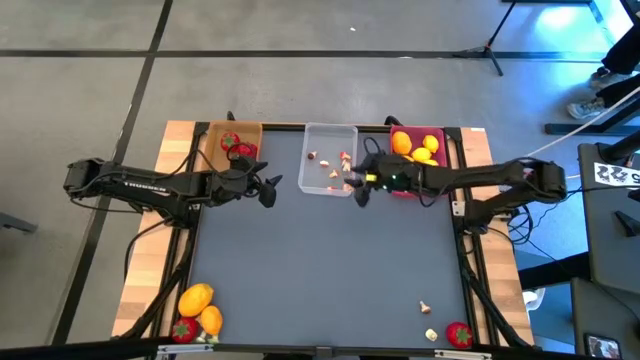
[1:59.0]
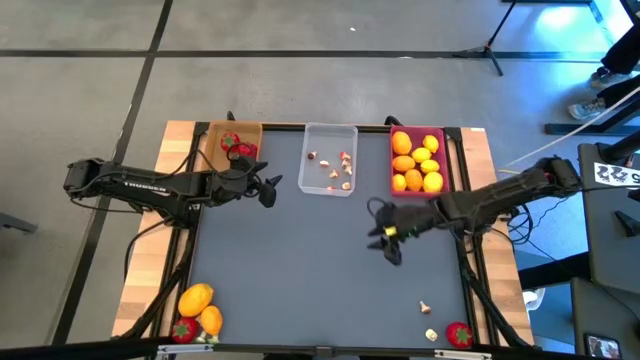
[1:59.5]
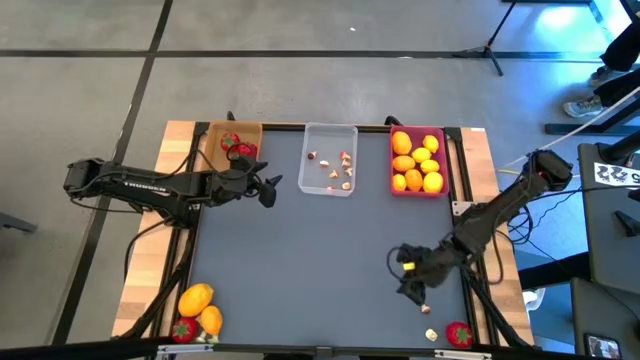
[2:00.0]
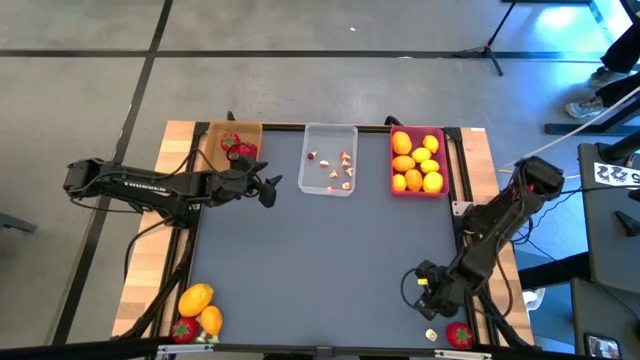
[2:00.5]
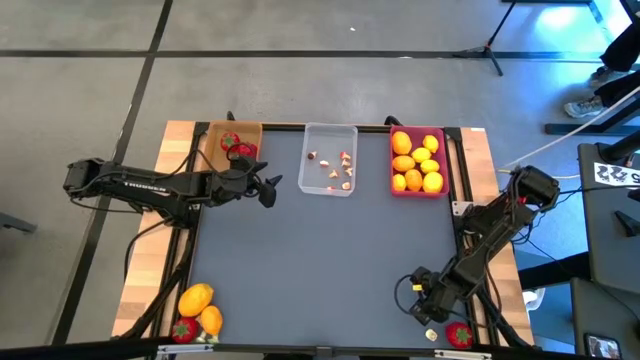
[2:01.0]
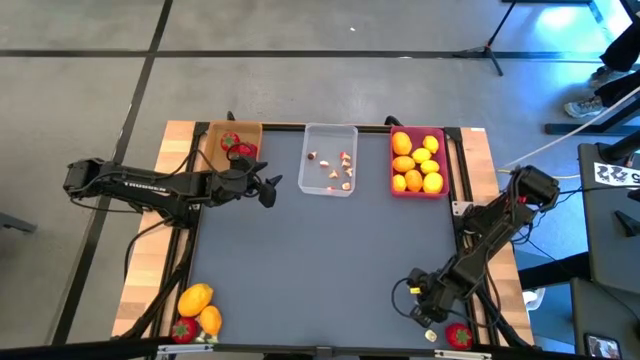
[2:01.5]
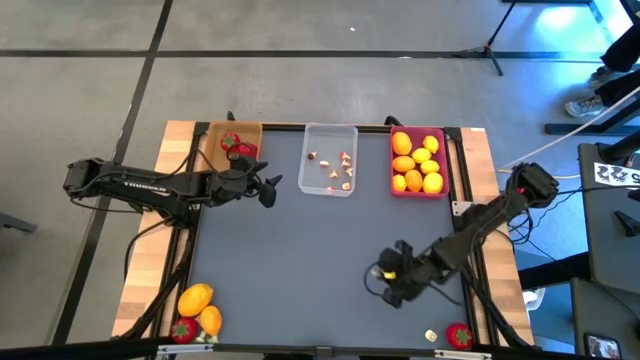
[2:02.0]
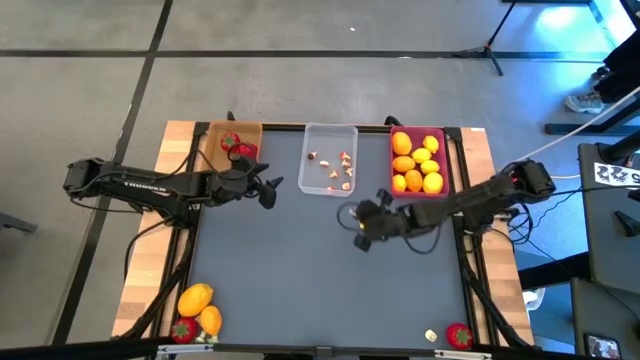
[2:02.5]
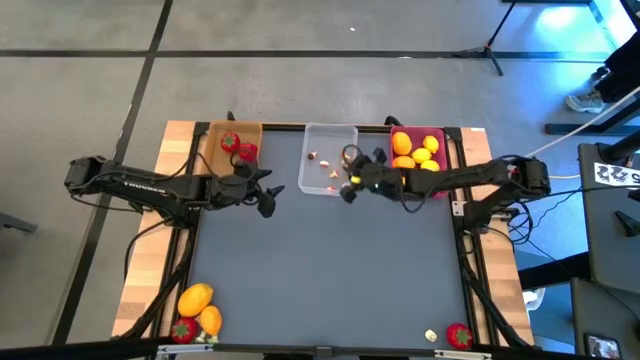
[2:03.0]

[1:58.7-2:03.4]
Task: Sort produce into baskets
Put the mushroom into the transparent bin

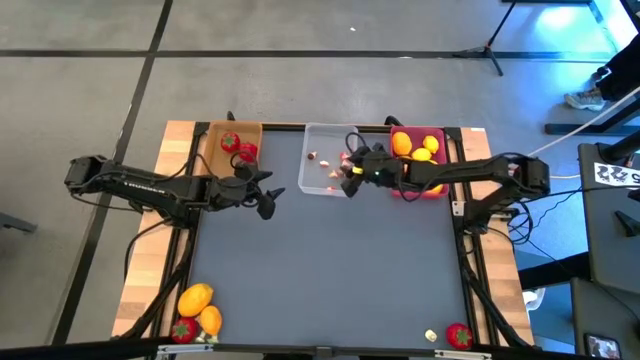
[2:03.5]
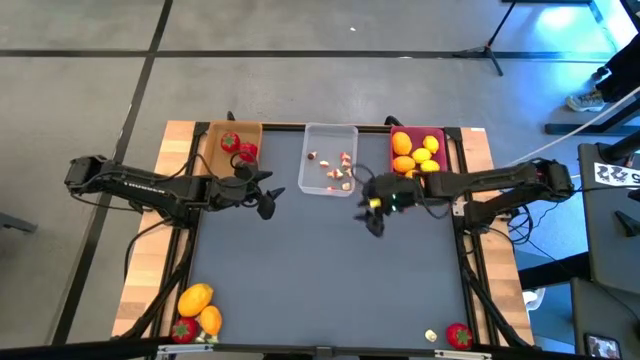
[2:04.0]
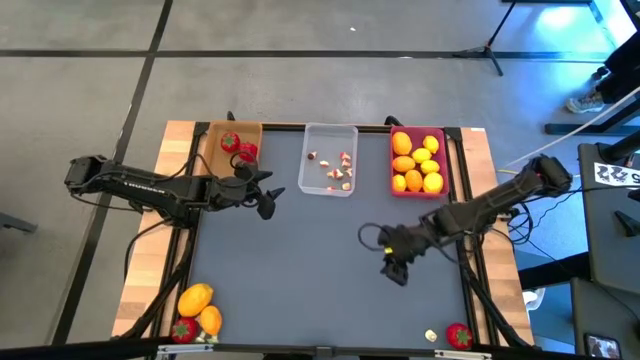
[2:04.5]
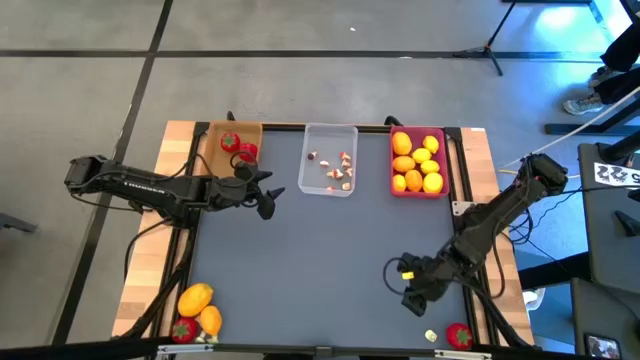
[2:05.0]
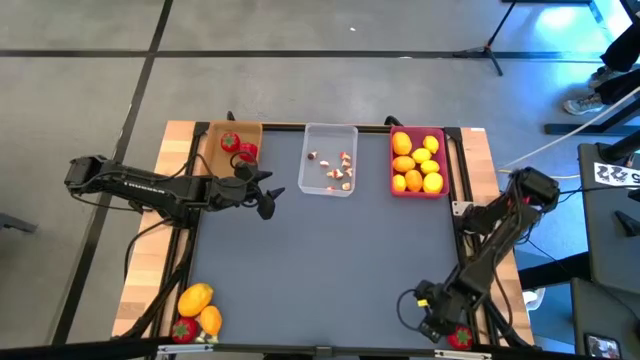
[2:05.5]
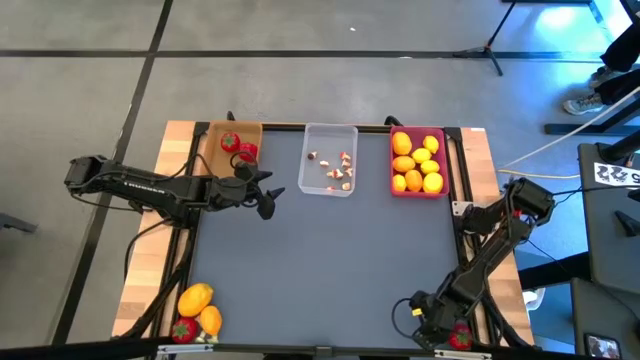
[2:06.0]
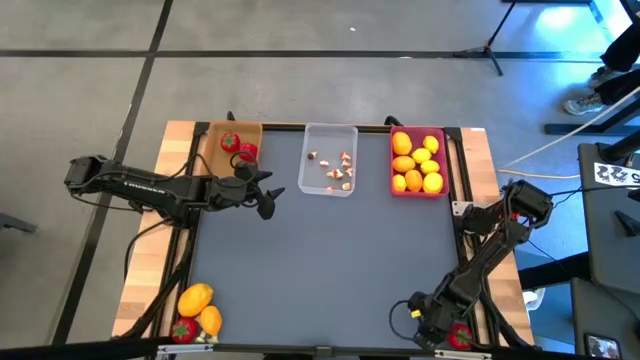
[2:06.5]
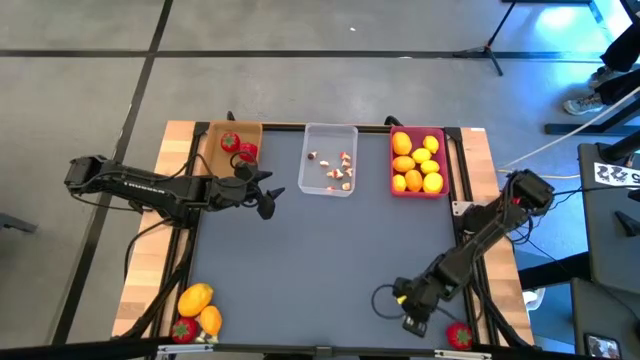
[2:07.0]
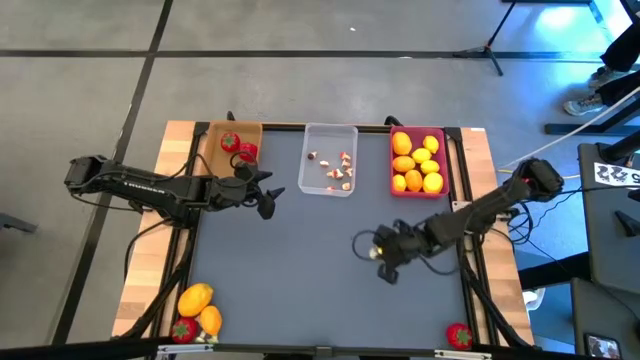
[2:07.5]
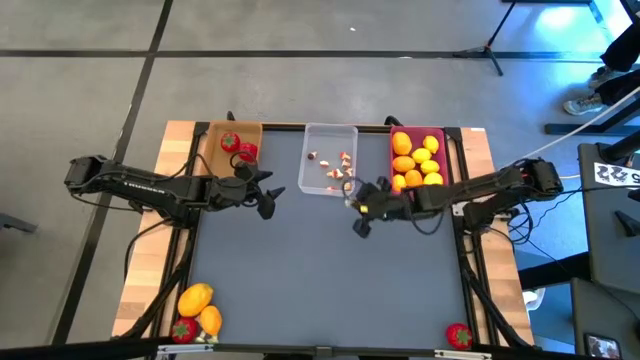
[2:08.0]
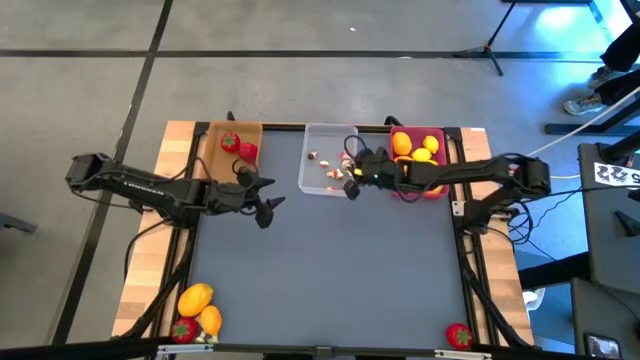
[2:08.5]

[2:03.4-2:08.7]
Put the mushroom into the transparent bin

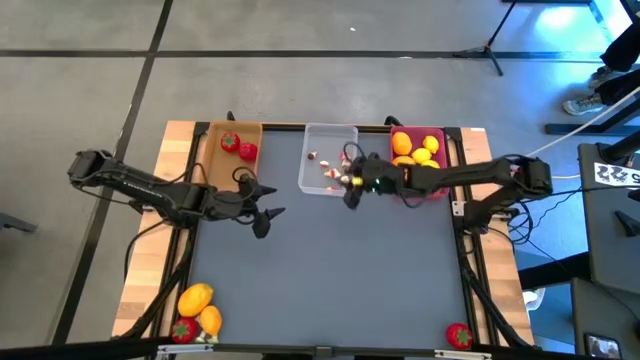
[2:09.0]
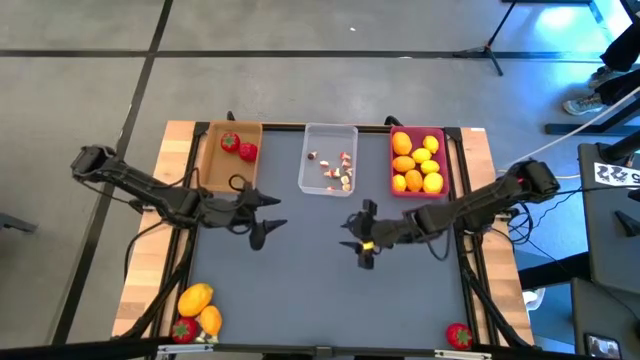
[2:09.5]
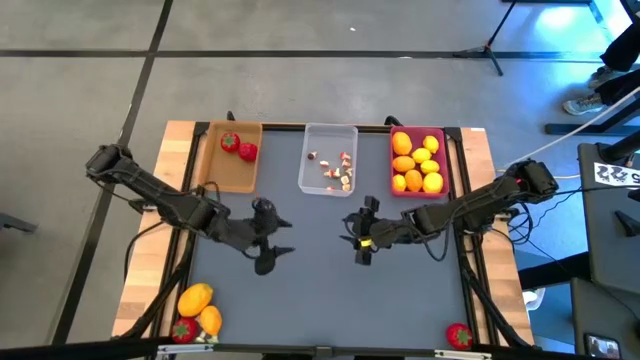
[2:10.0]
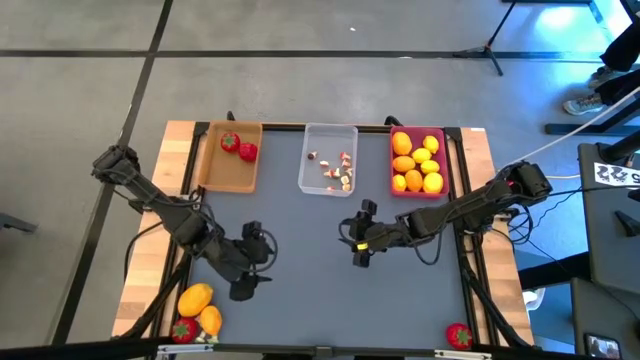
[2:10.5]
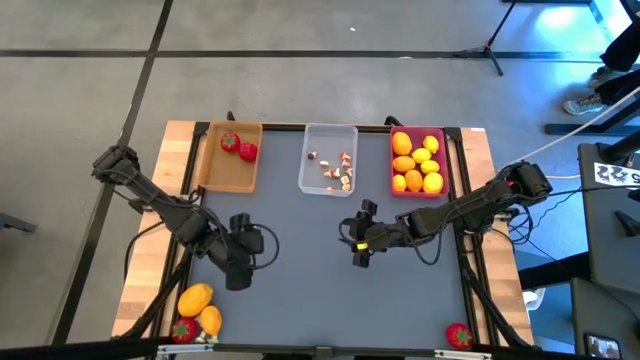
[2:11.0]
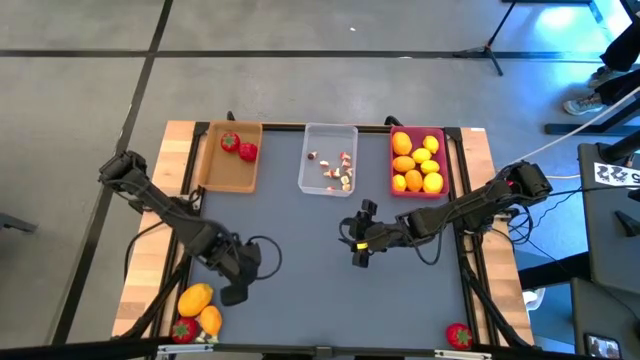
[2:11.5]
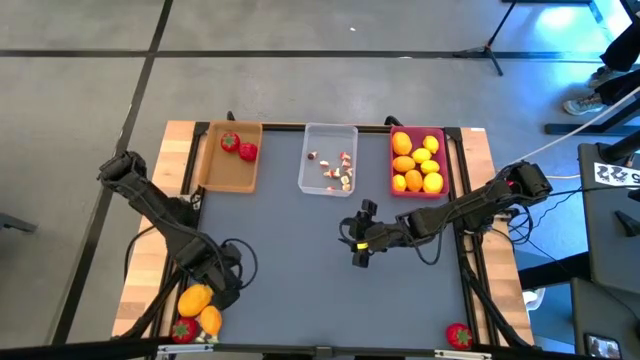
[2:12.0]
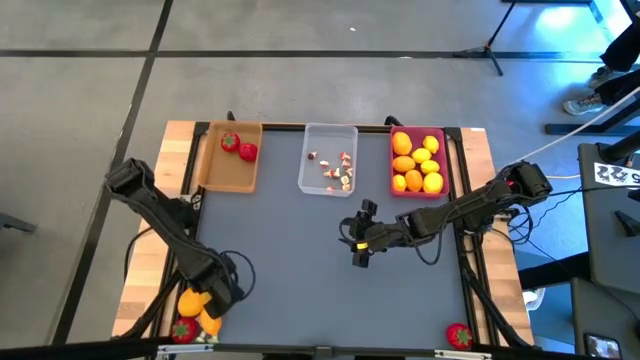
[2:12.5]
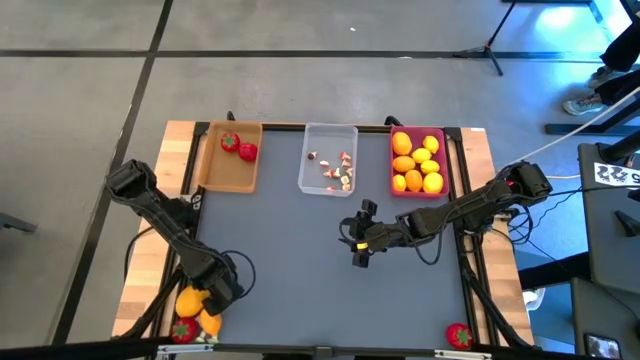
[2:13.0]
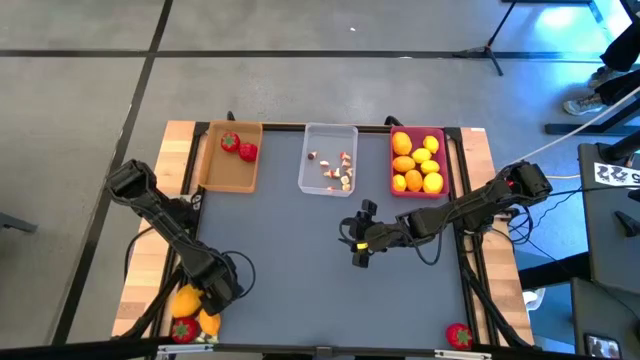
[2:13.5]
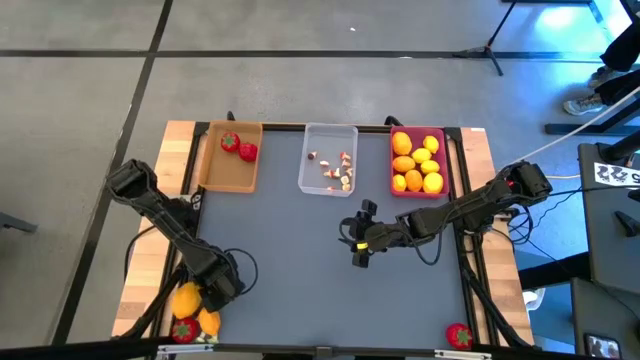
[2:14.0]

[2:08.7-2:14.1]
Put the lemon into the pink bin

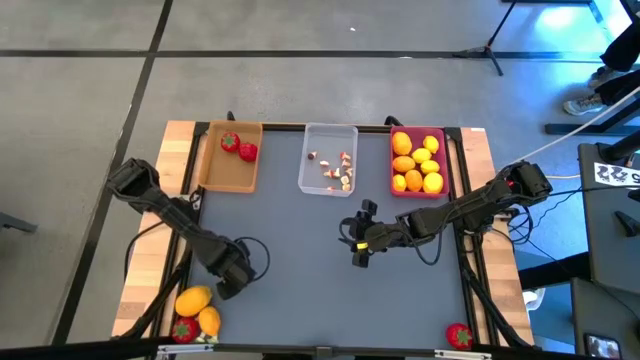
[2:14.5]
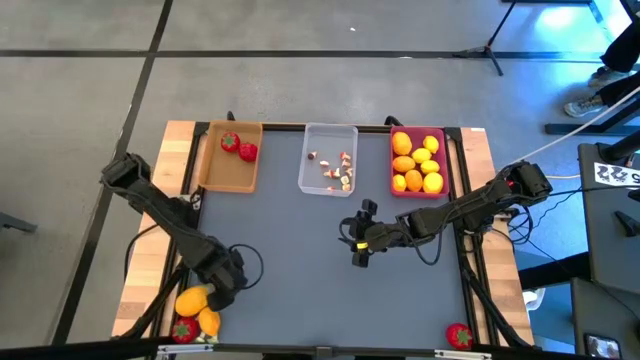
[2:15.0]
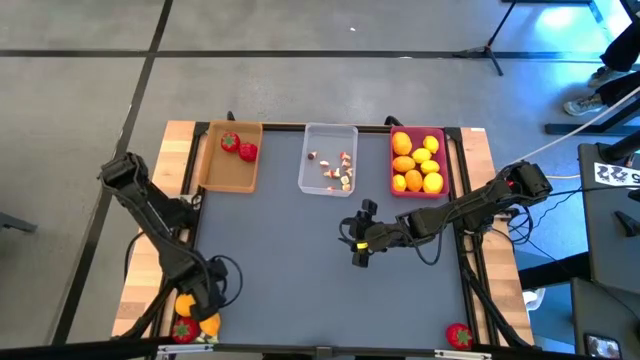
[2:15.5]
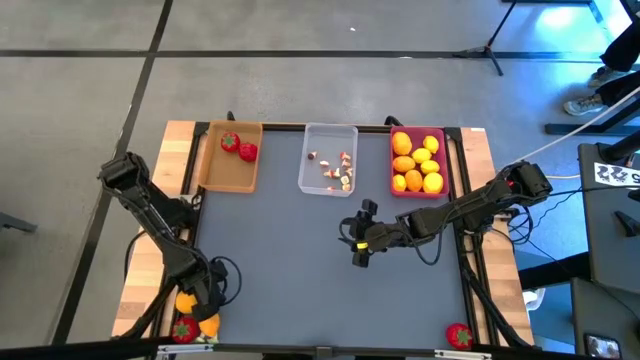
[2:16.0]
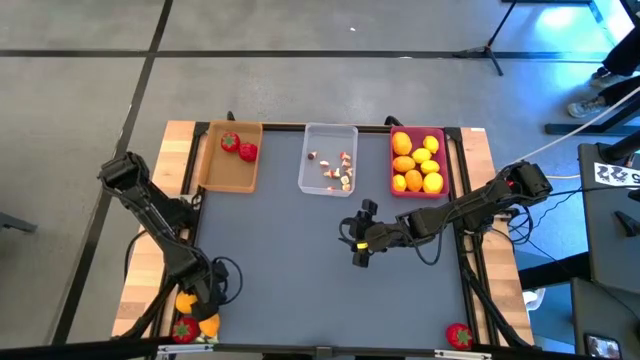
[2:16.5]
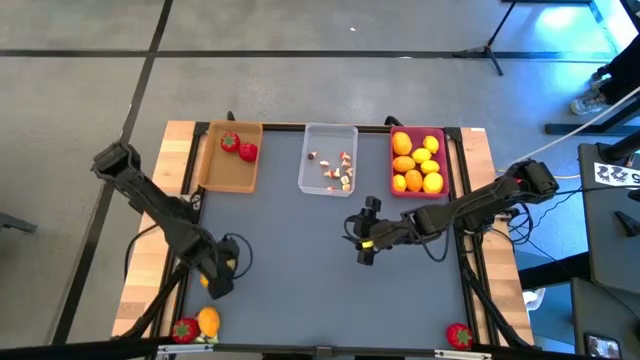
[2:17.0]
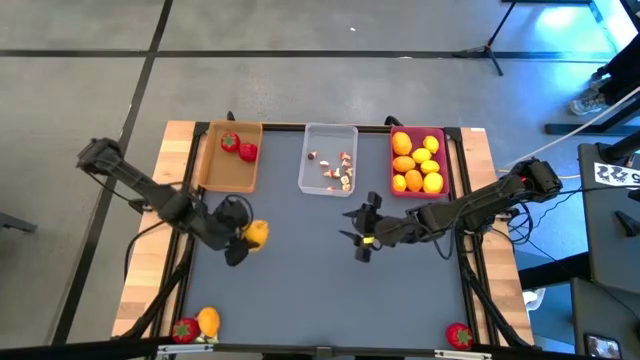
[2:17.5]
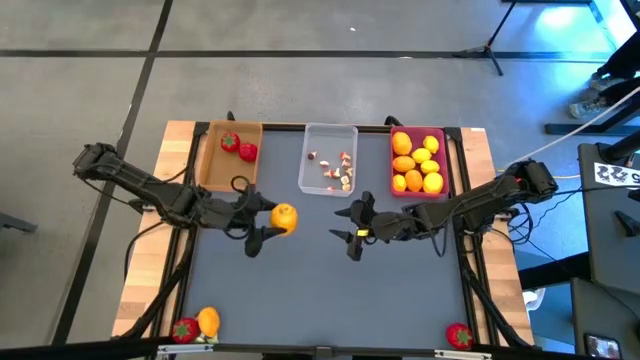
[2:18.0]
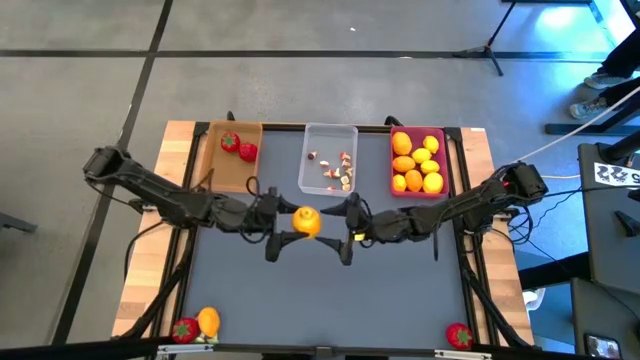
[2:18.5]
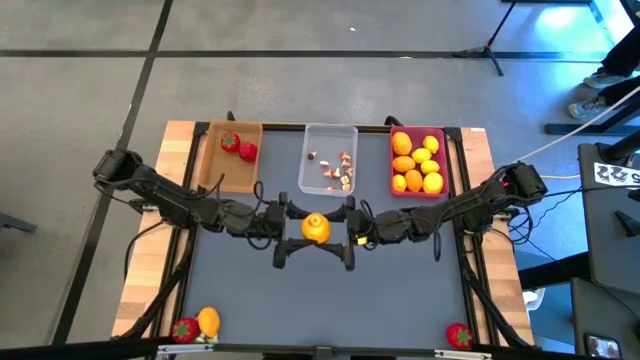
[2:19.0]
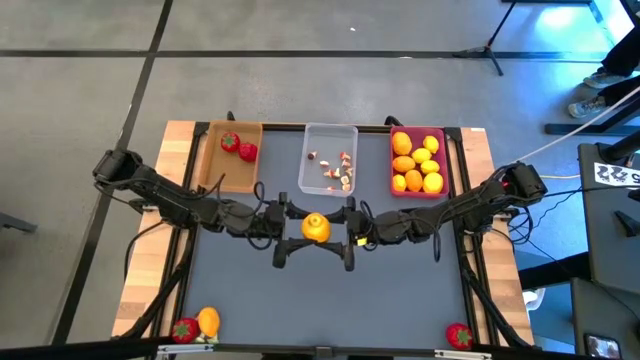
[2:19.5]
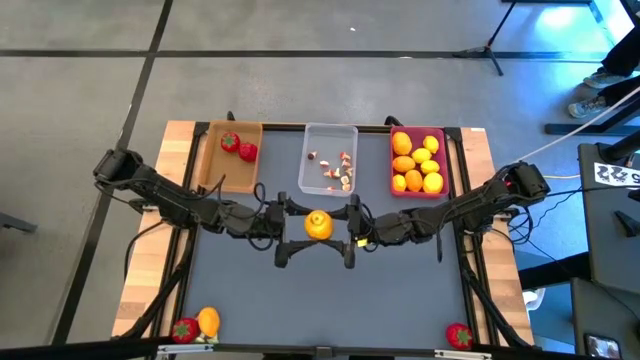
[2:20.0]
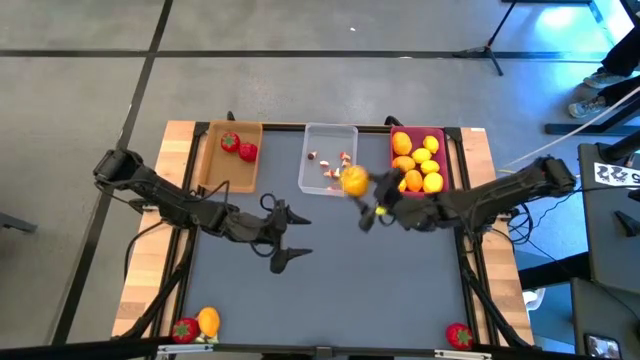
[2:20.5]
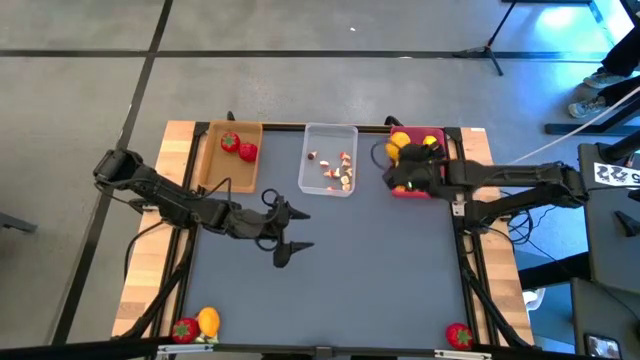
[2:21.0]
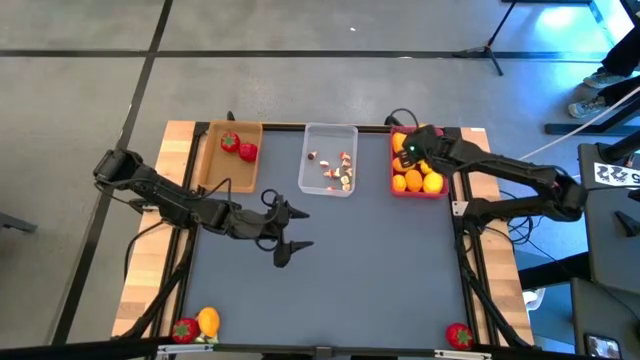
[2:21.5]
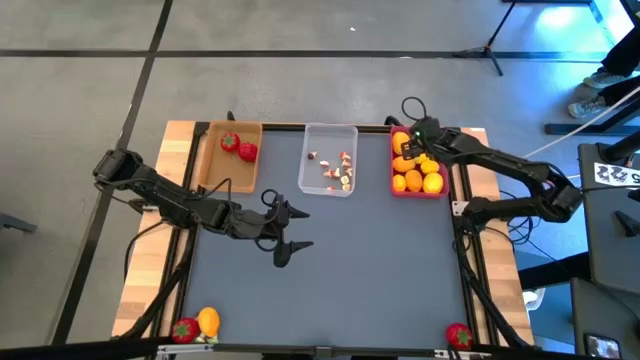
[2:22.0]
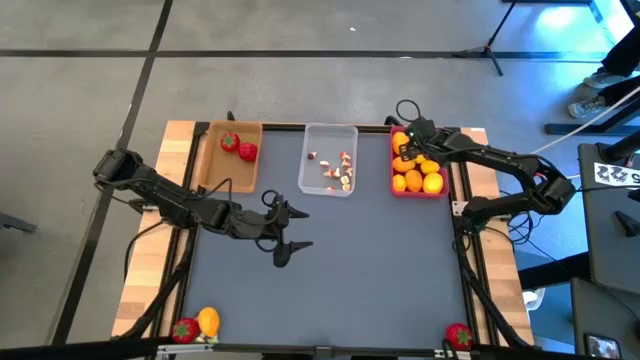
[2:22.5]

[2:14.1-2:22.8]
Put the lemon into the pink bin
